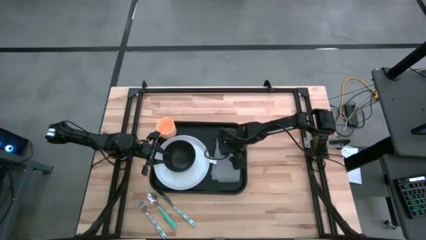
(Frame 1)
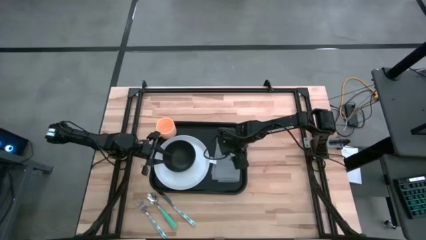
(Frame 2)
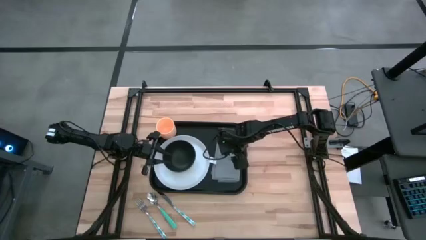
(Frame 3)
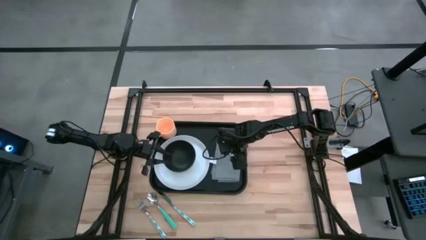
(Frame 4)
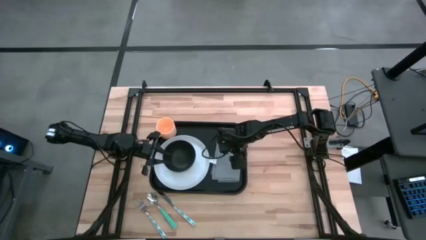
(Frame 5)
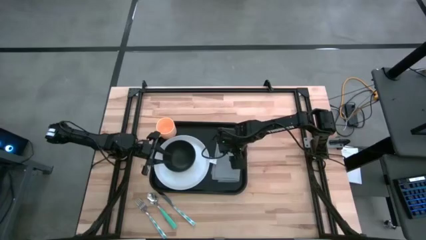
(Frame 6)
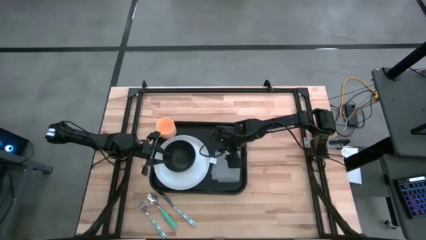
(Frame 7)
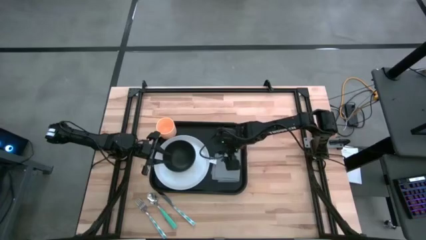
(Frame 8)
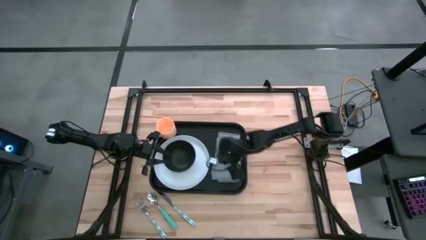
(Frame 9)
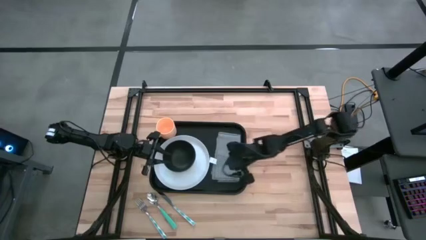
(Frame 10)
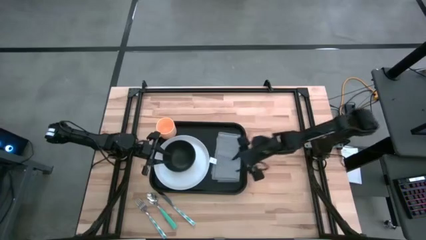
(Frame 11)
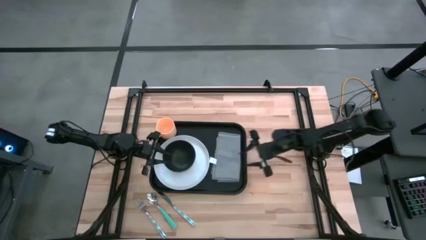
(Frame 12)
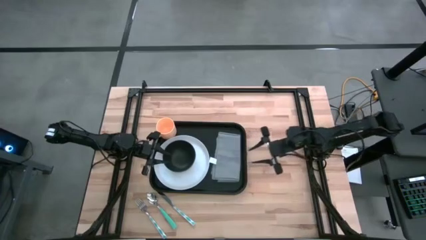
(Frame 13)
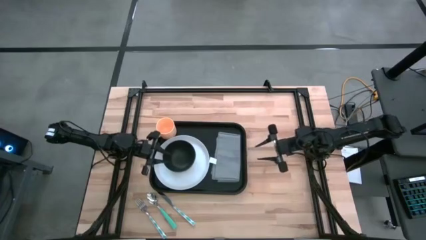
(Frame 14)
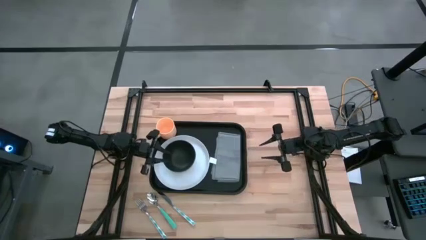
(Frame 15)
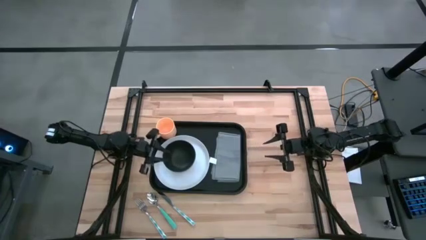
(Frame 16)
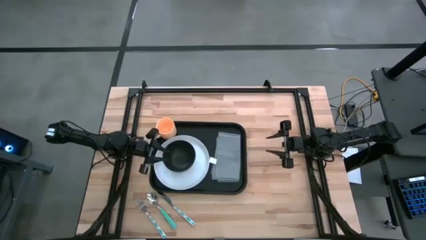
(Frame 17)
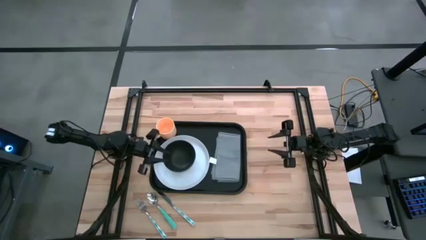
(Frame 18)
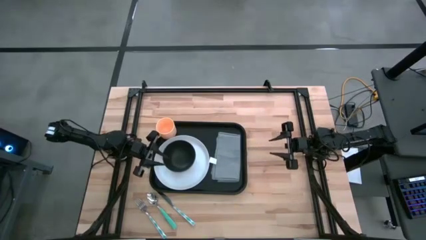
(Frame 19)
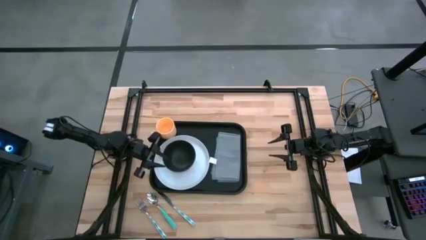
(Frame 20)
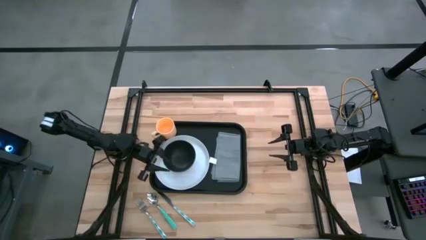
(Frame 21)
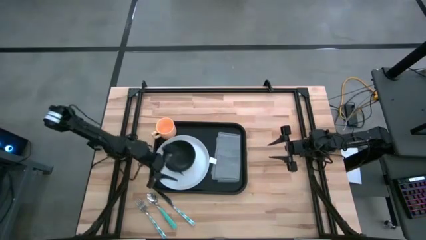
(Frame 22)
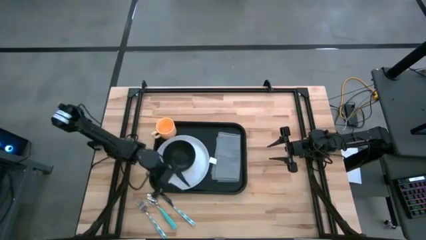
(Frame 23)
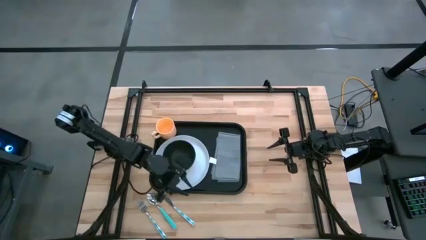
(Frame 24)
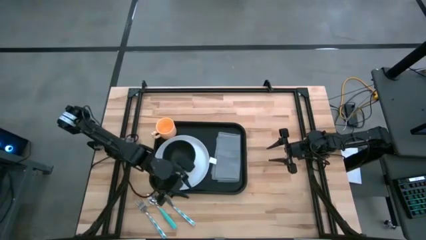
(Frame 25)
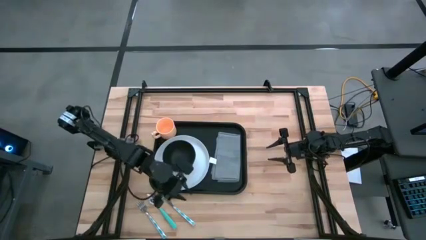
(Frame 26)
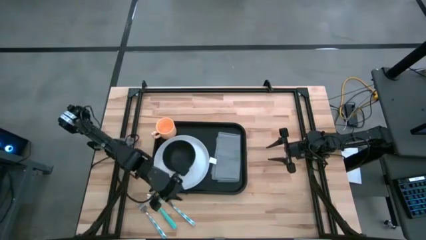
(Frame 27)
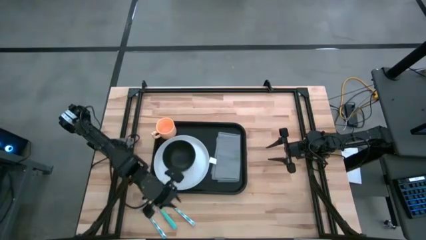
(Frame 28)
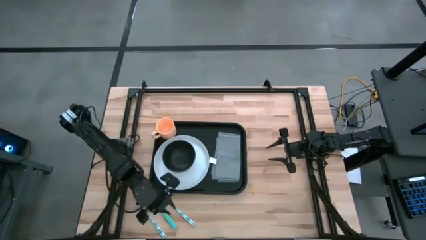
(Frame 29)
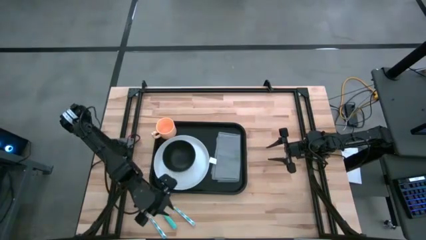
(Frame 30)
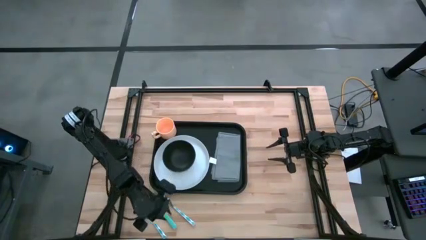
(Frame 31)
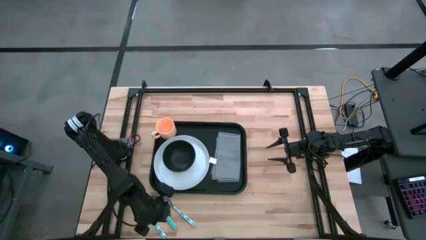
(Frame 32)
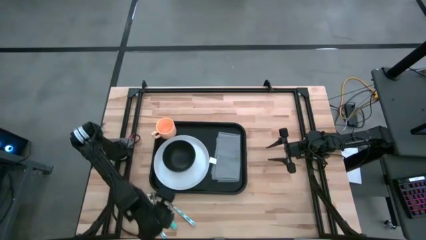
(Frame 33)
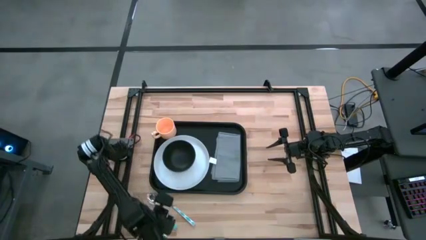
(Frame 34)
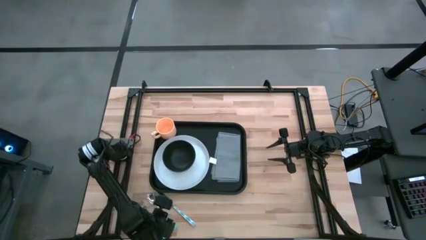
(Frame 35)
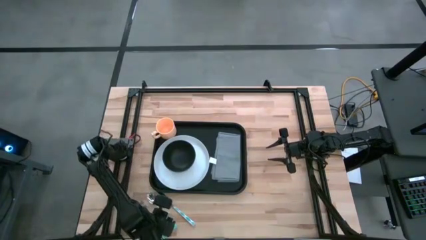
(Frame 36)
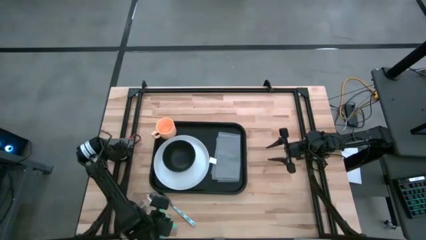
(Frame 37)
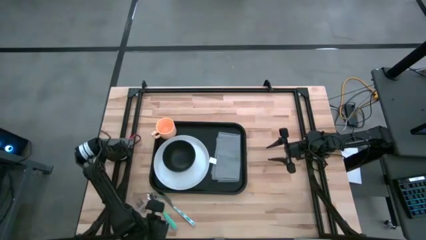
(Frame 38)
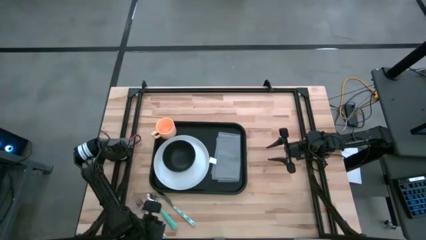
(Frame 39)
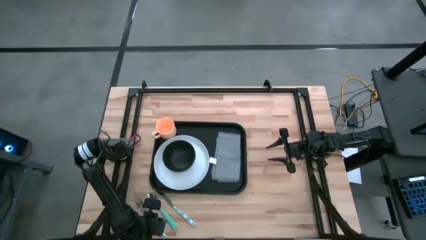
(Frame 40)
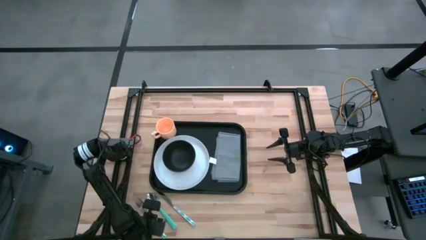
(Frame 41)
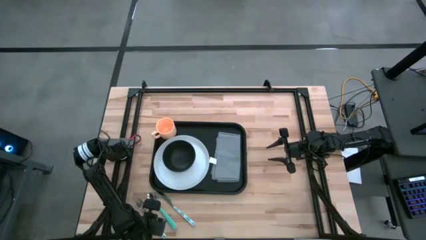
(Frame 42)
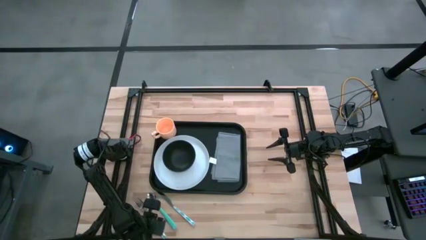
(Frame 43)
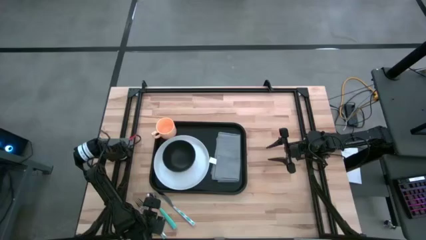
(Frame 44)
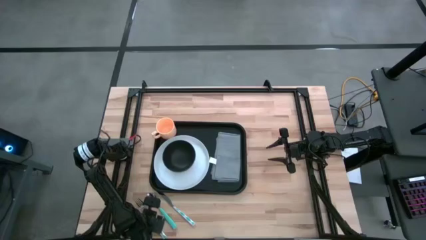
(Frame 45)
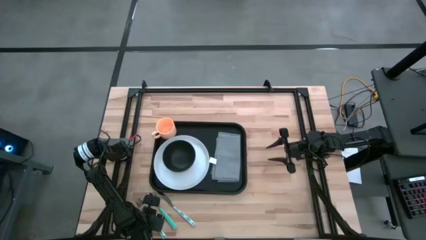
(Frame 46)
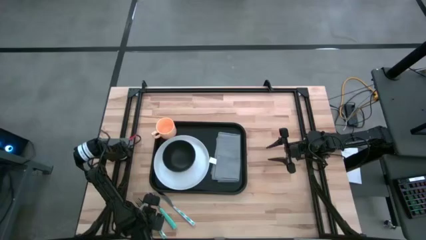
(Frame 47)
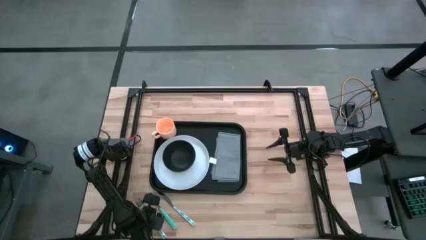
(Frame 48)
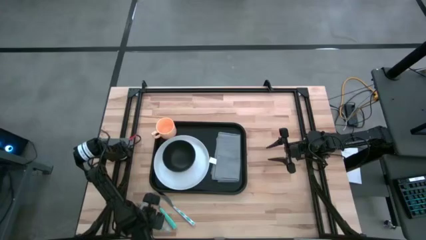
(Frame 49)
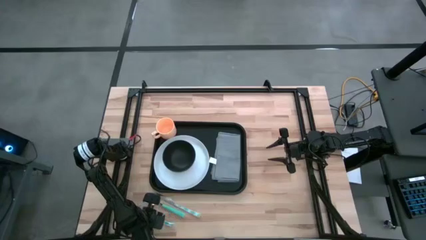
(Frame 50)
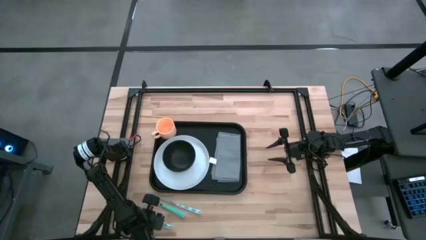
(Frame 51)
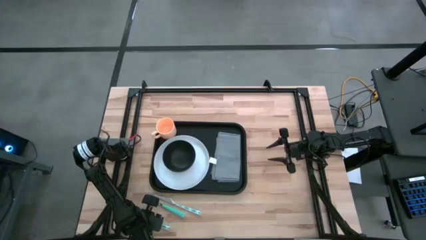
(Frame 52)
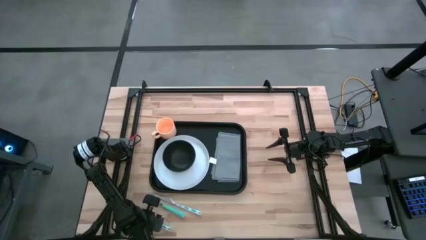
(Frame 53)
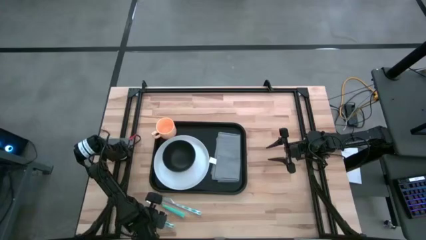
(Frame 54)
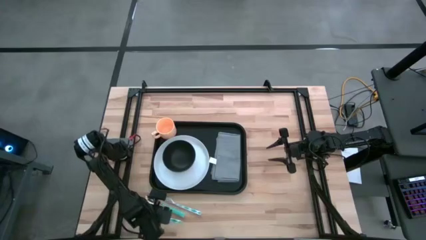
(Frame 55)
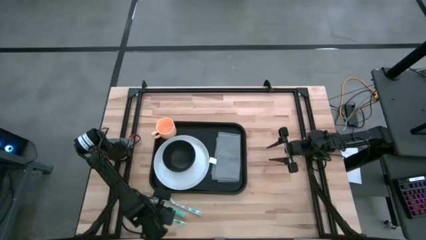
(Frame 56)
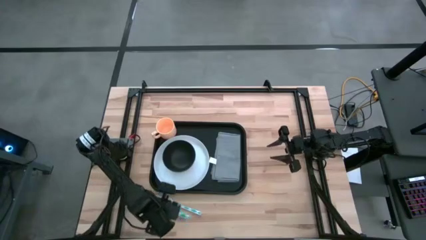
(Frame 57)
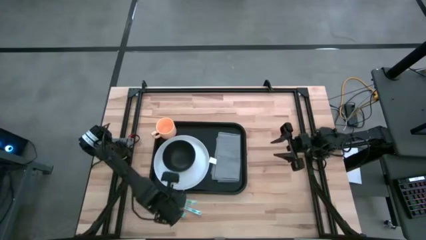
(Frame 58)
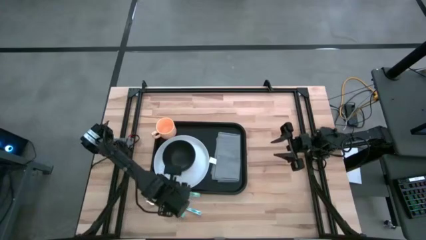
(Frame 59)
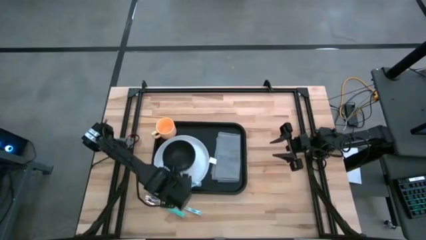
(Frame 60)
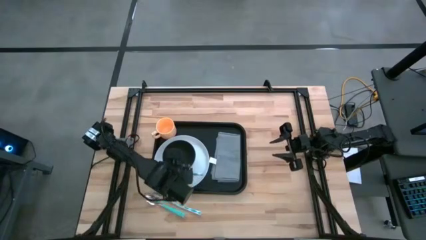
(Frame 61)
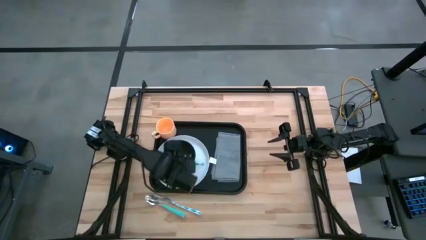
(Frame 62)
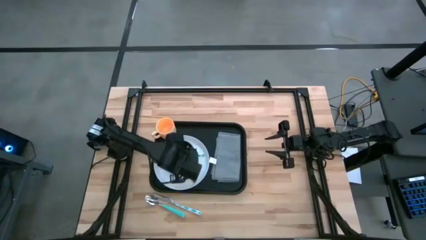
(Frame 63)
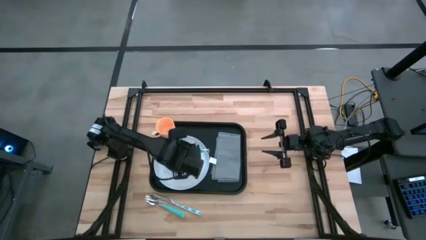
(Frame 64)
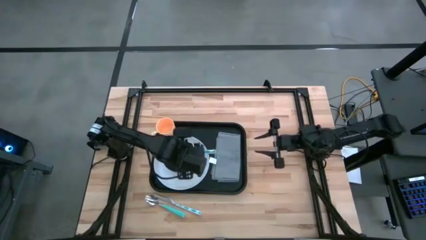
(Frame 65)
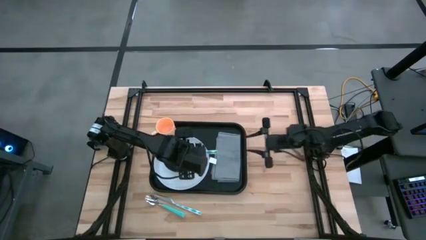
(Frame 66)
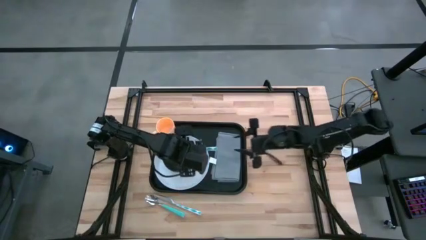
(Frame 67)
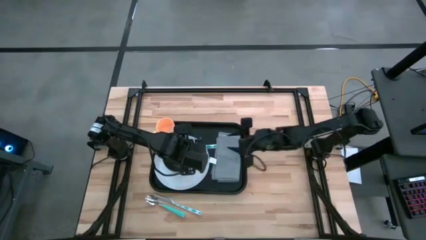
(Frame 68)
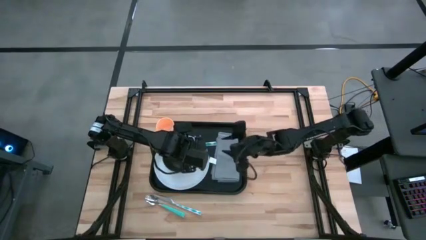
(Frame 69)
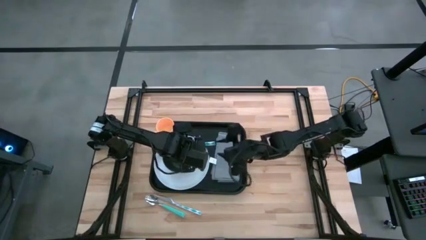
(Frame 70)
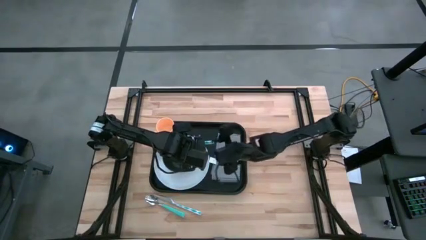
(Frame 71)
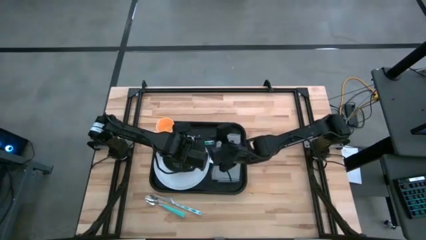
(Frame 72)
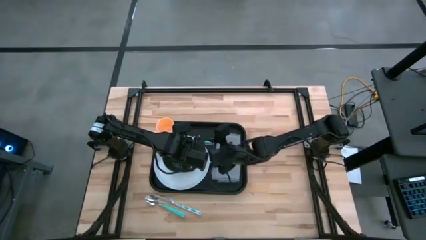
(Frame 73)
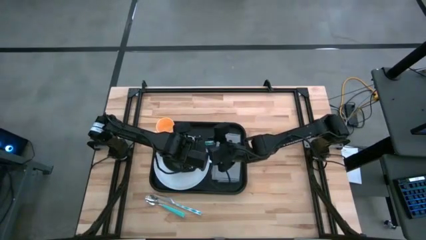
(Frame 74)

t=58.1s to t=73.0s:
Task: Set up tray
Put the green fork on the gray napkin

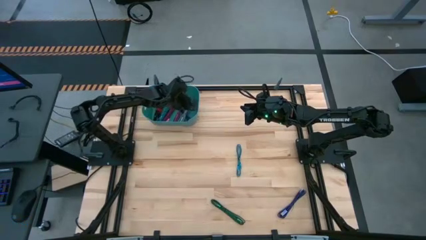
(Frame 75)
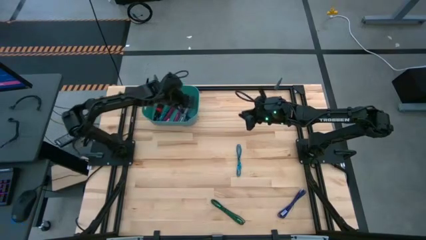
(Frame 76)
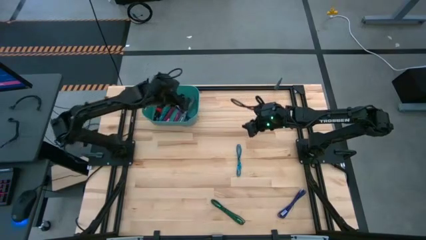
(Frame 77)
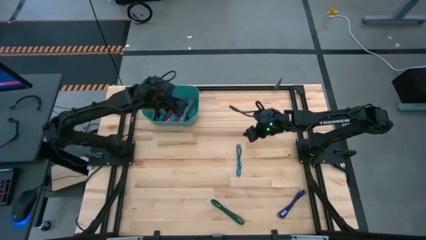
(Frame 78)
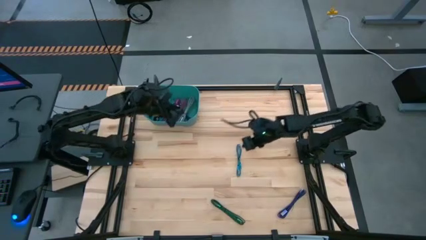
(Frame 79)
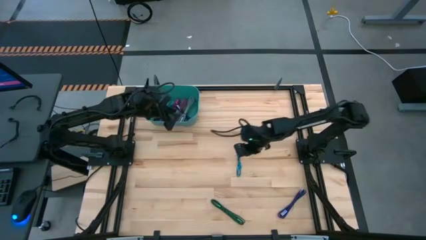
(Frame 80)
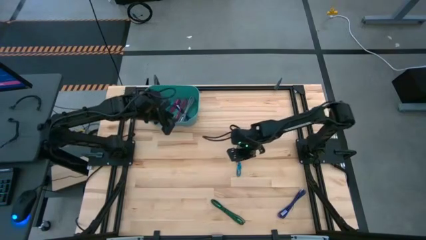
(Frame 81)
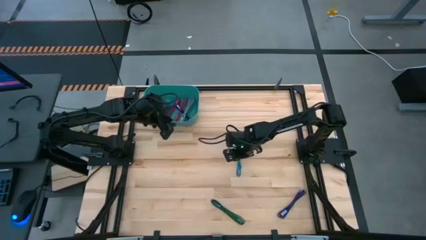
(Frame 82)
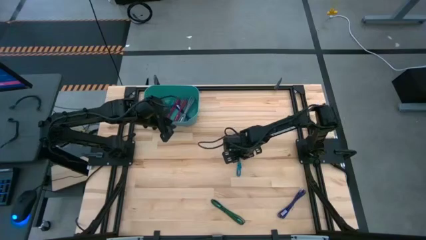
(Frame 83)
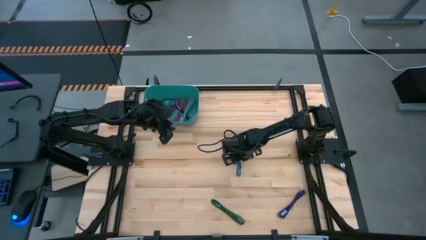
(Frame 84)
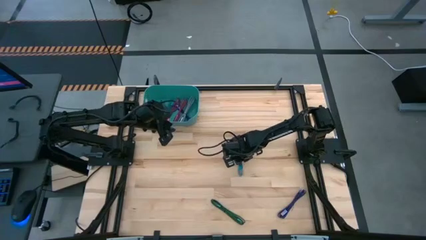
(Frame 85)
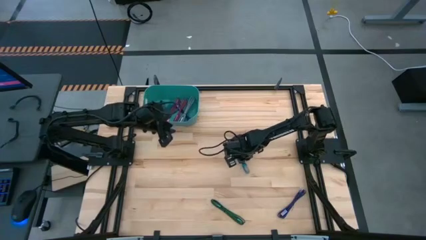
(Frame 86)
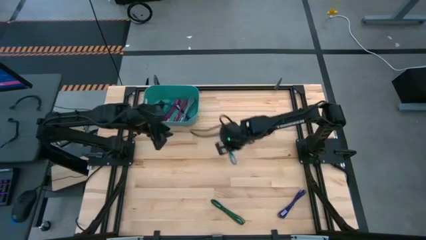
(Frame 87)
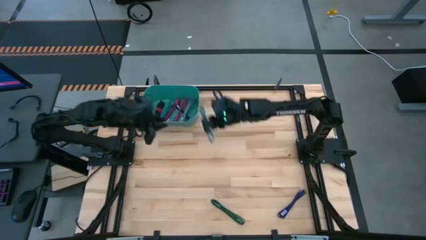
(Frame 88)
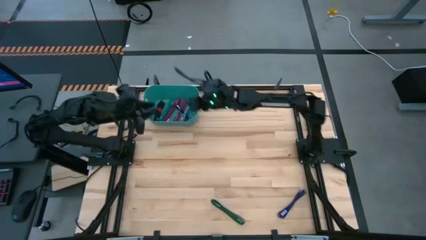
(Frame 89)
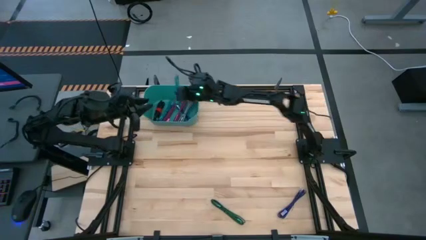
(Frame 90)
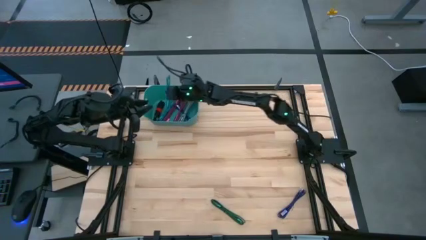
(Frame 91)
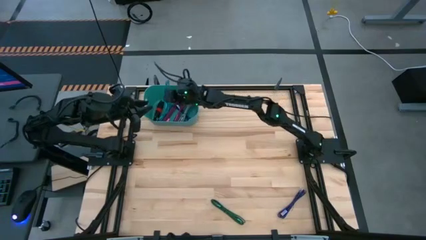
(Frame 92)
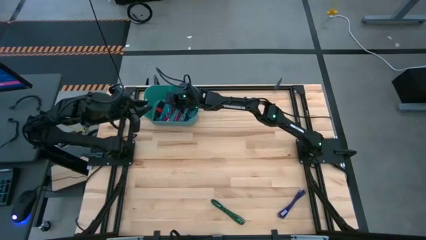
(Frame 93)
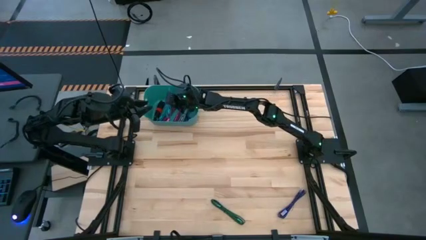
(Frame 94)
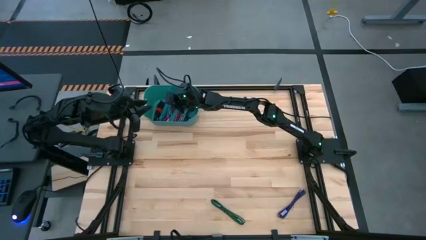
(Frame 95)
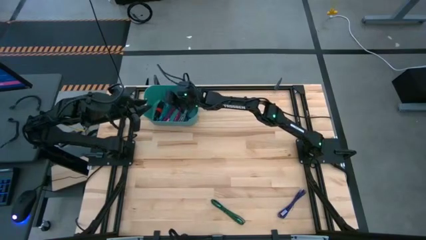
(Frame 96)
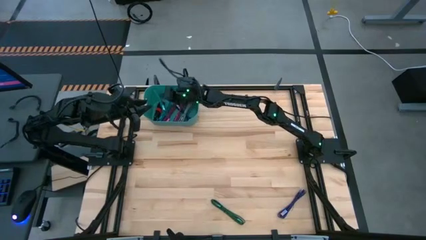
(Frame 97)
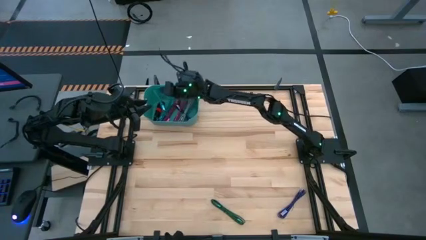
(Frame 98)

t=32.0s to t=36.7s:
Task: Pick and place USB-C Cables
Put the blue USB charger cable into the green bin
